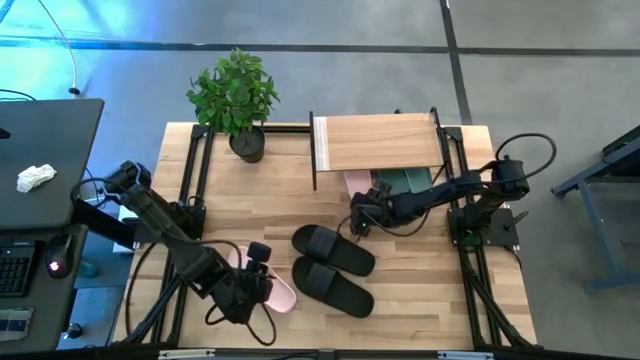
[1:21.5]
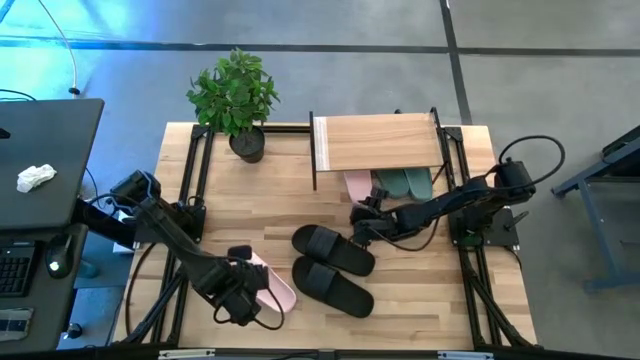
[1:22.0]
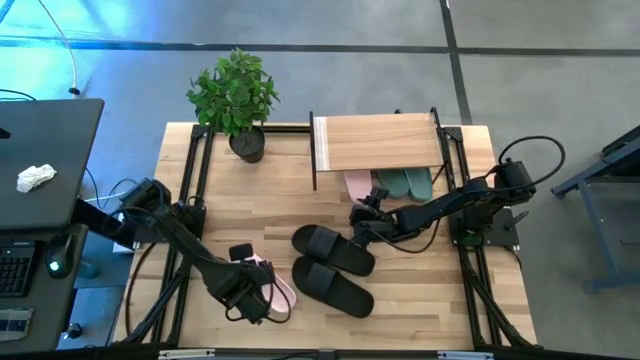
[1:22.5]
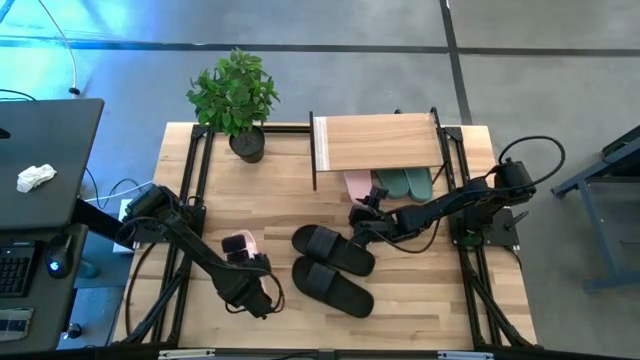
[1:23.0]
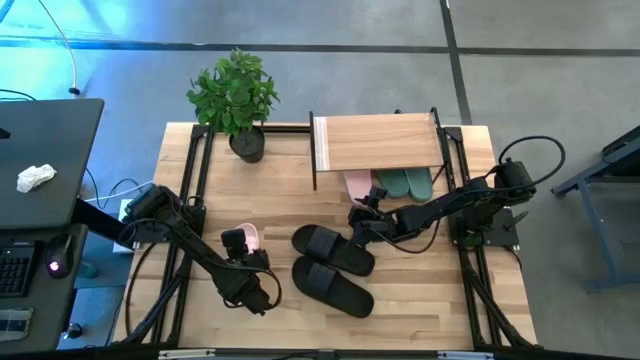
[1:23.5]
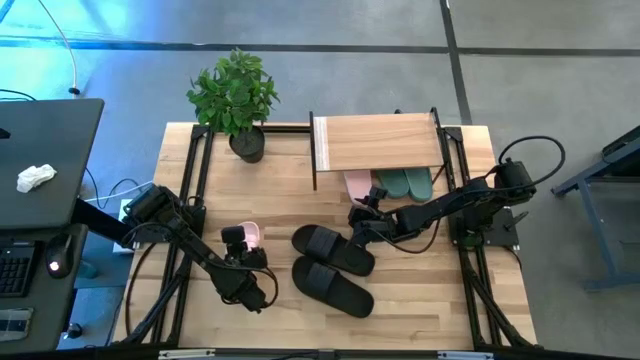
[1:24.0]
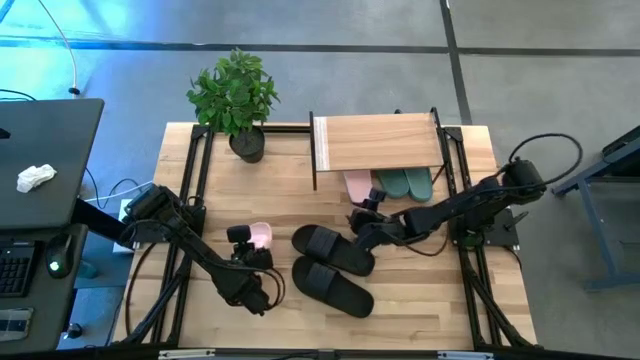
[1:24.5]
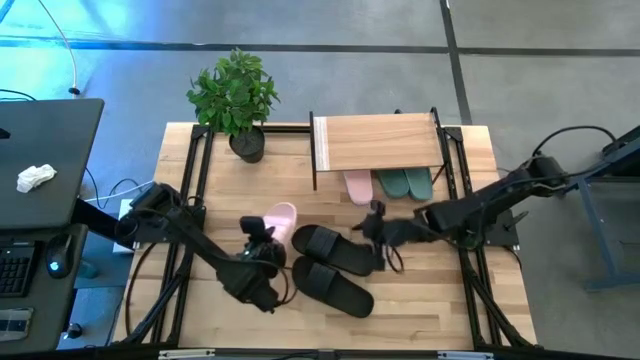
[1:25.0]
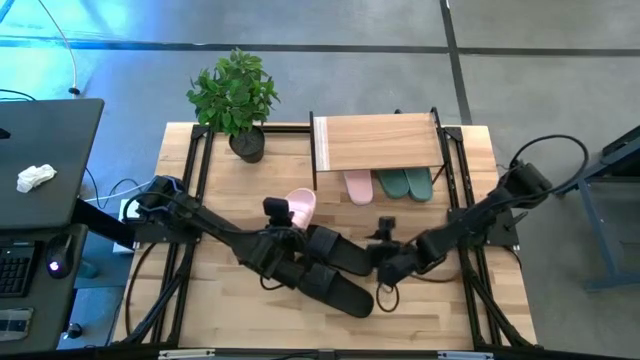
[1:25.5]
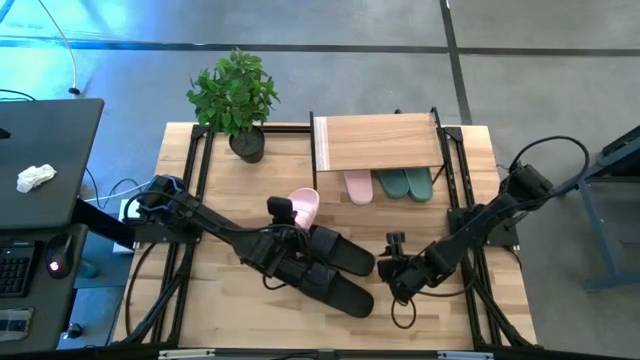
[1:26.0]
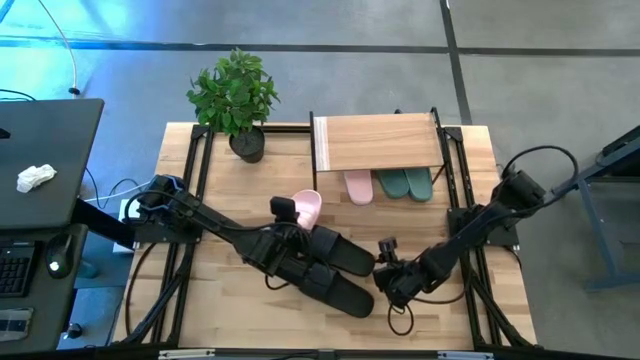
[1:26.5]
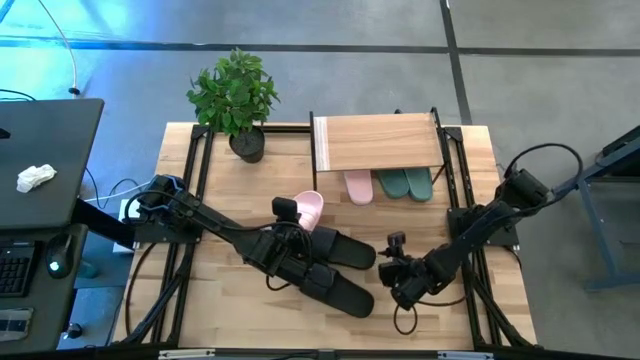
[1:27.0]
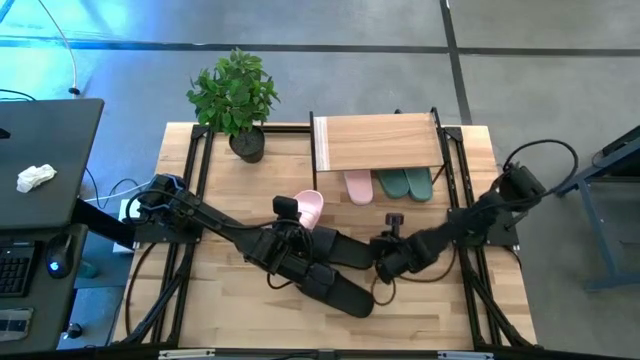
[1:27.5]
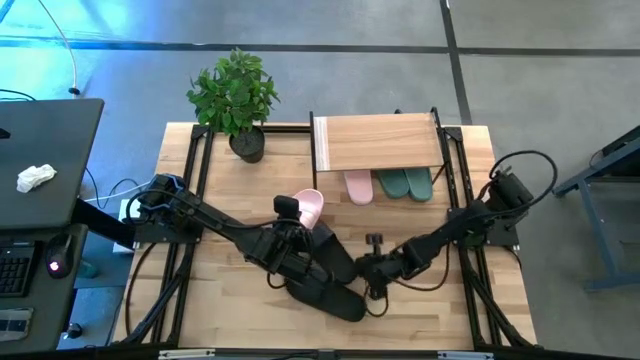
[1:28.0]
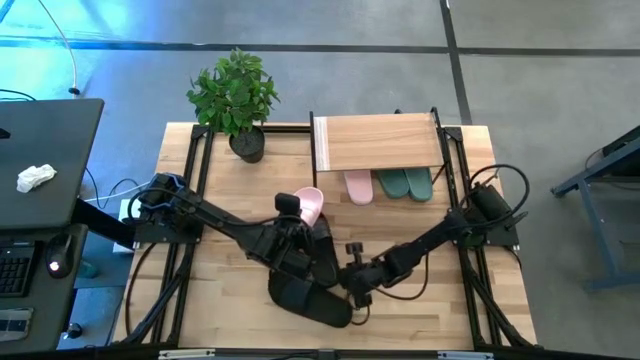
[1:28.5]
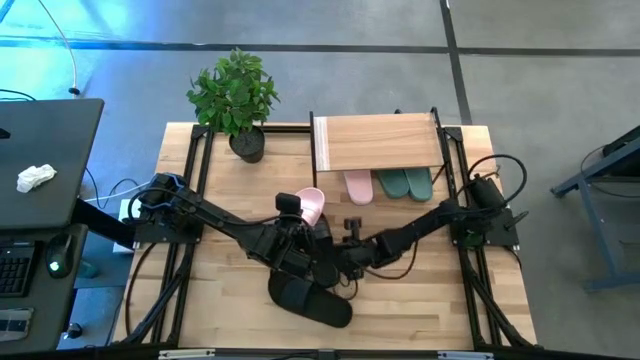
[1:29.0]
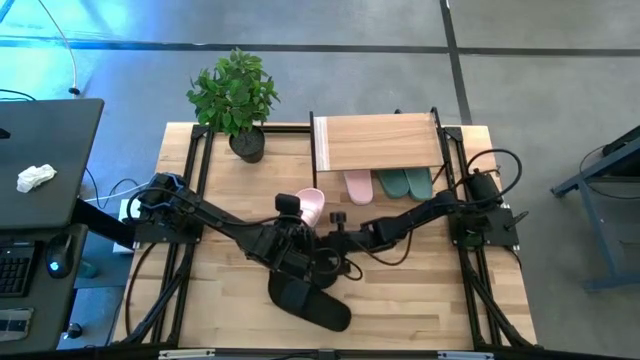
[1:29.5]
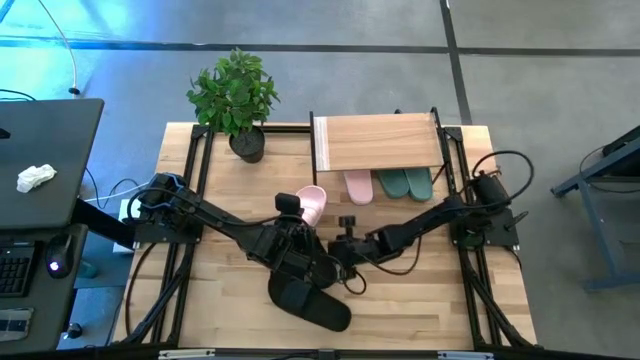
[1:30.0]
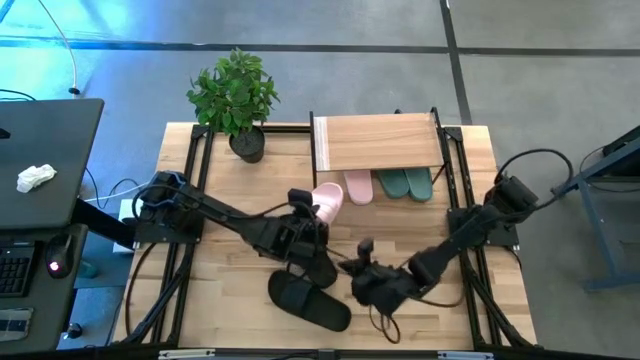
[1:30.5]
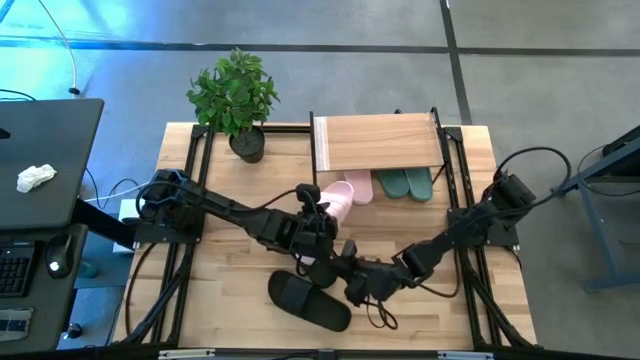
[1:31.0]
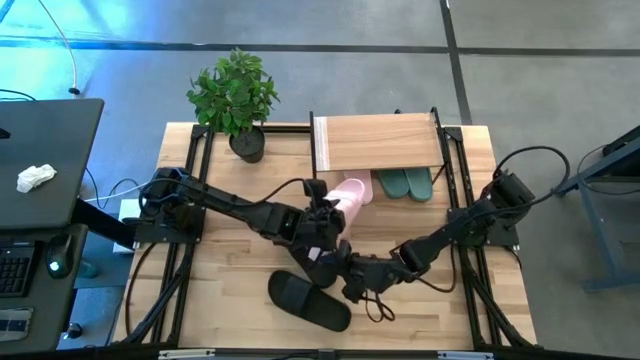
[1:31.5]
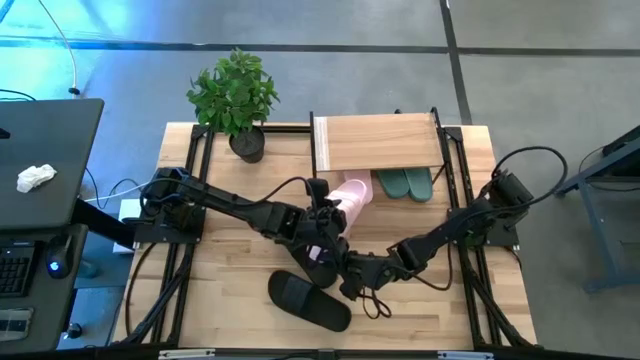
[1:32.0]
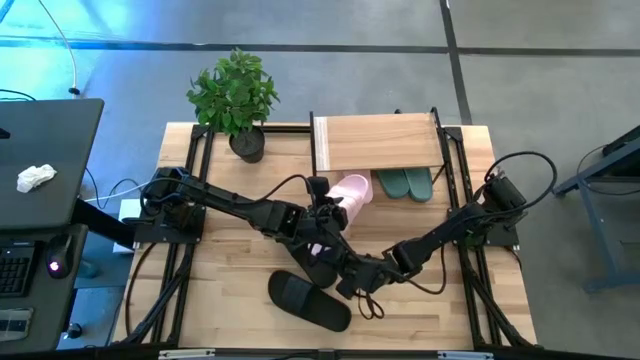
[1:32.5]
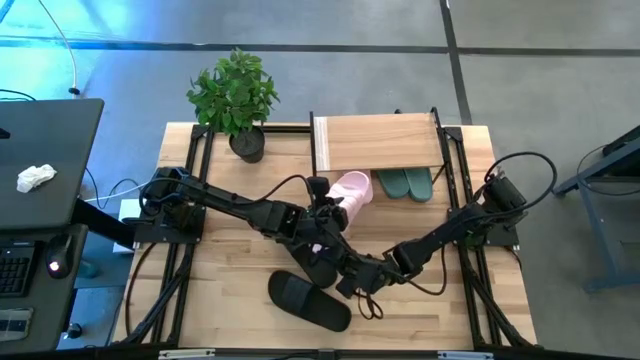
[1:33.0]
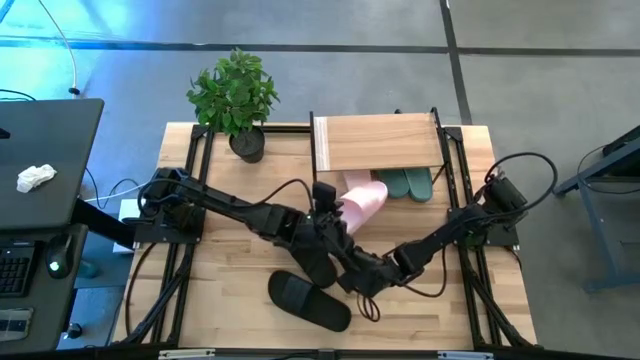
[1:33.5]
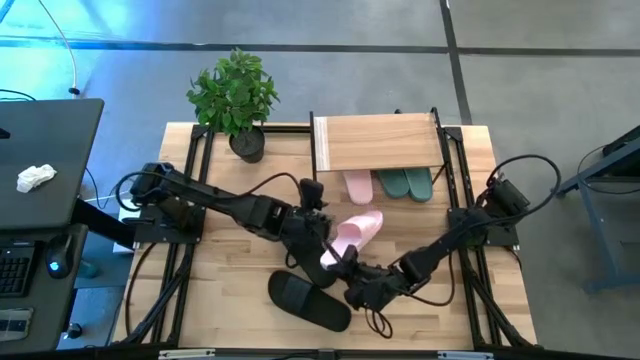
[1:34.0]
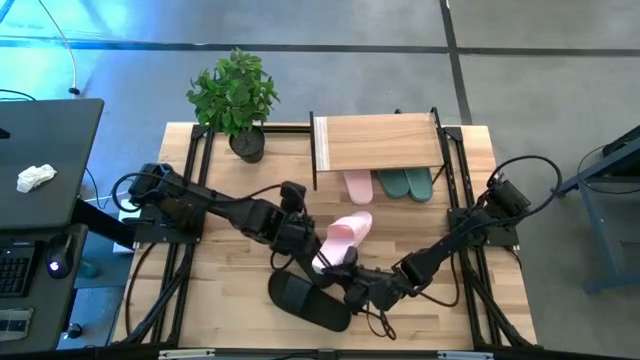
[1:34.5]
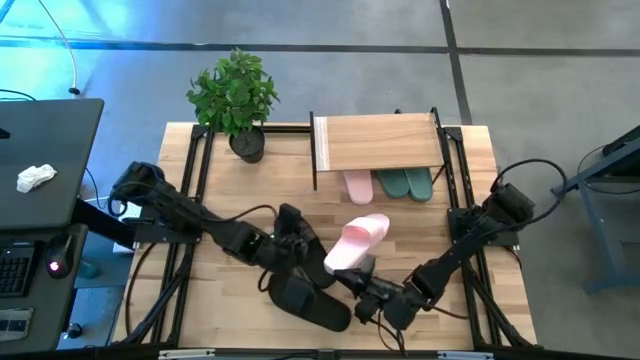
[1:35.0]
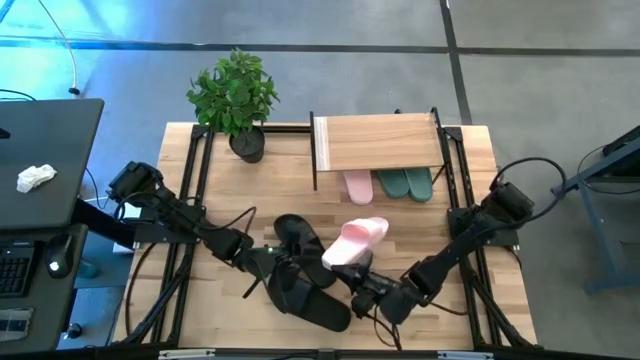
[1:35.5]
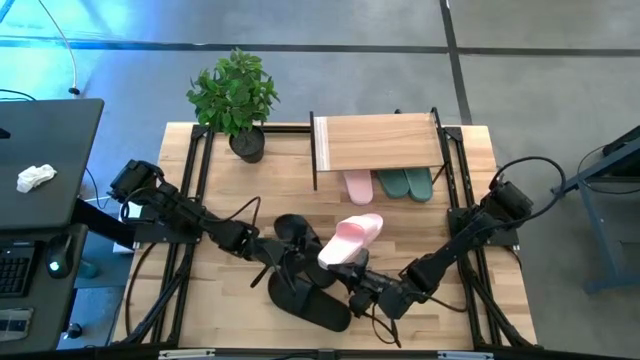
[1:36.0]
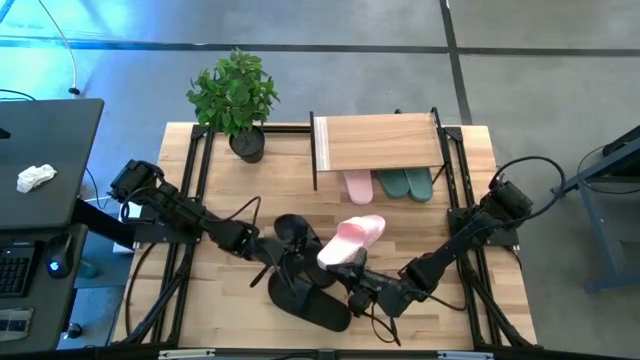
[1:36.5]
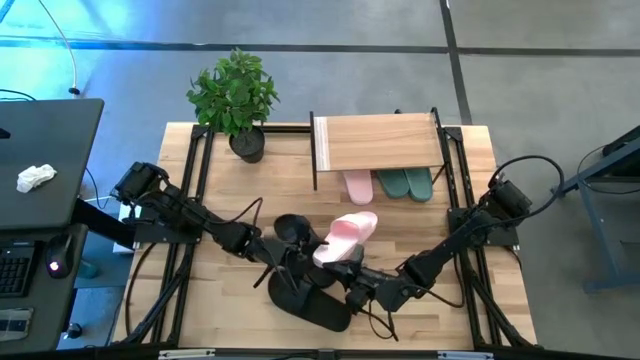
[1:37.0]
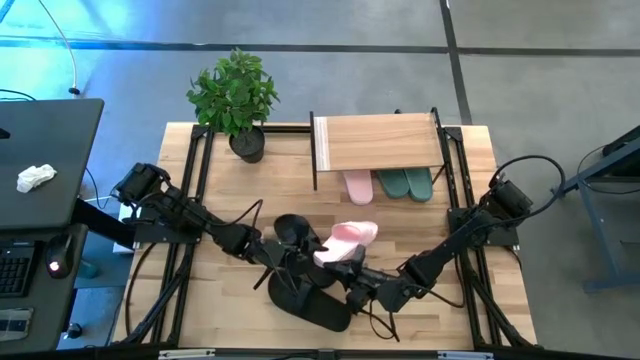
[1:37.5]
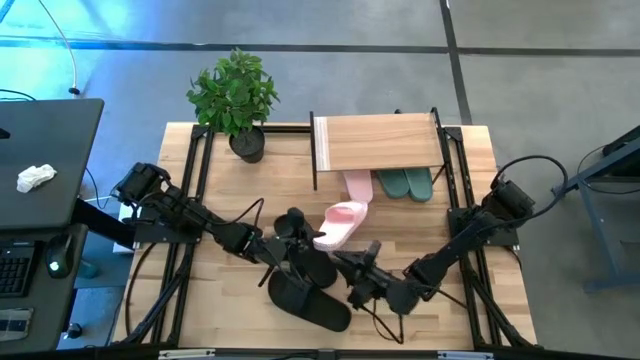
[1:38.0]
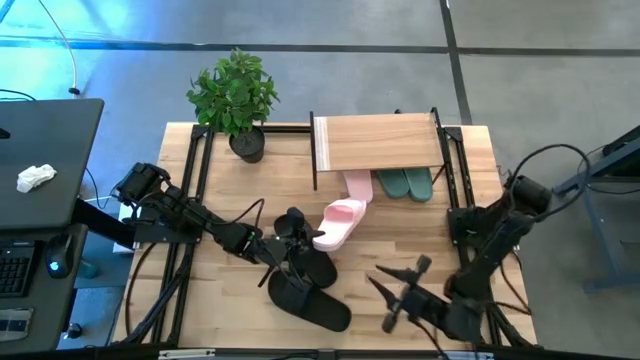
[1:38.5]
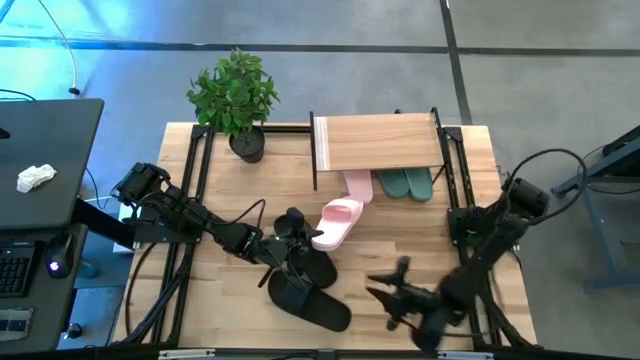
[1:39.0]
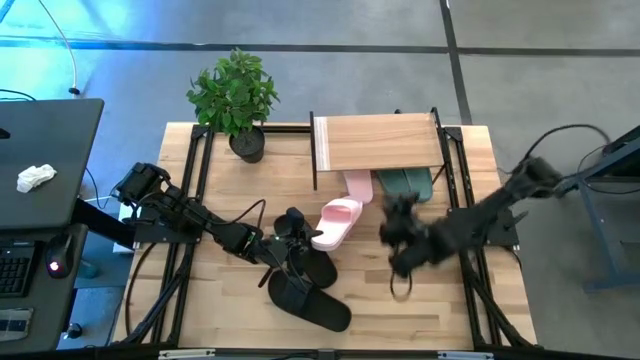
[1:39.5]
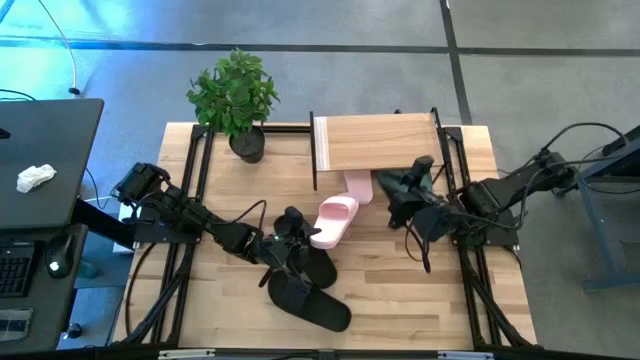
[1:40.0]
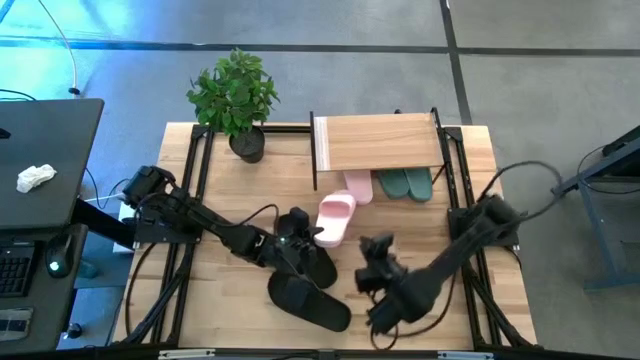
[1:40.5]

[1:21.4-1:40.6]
Task: Pick and place slides into the shelf
Put the pink slide under the shelf

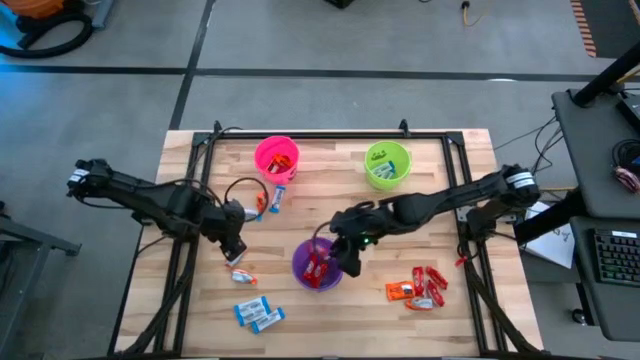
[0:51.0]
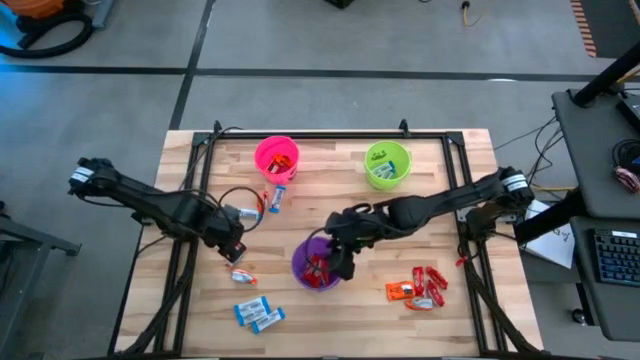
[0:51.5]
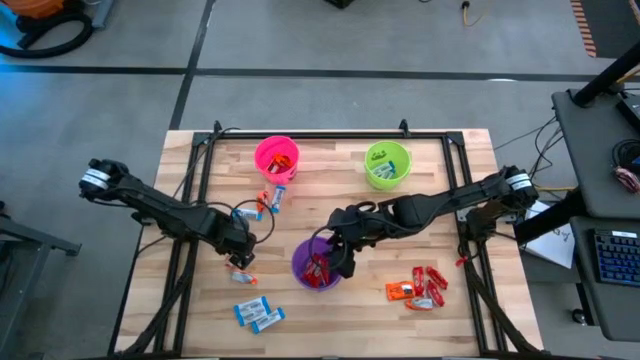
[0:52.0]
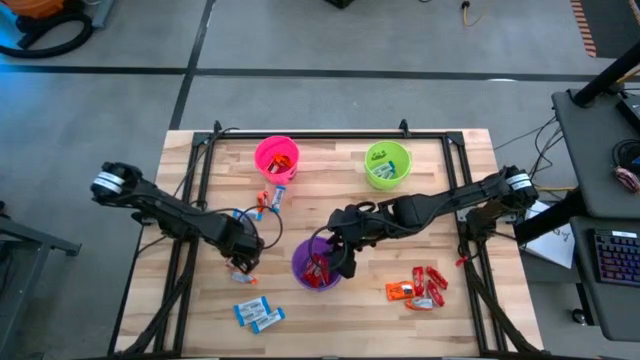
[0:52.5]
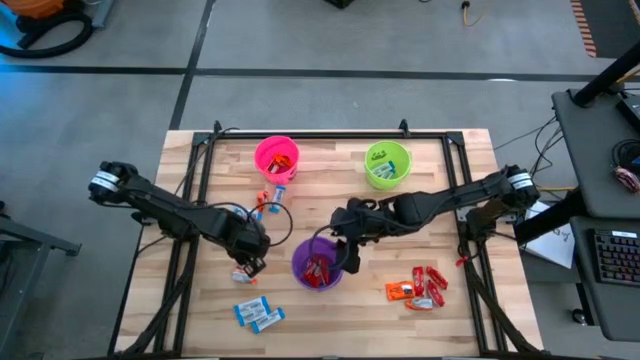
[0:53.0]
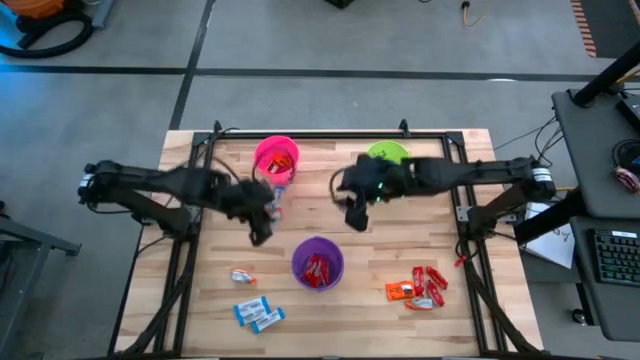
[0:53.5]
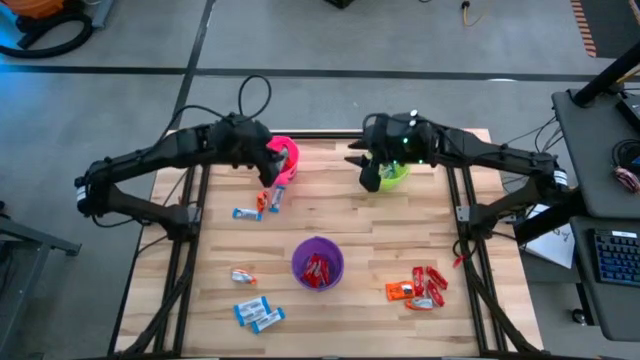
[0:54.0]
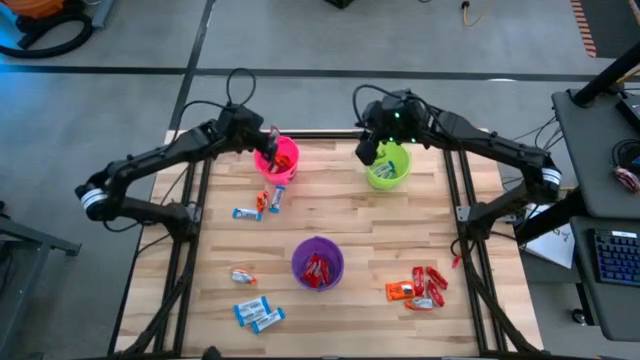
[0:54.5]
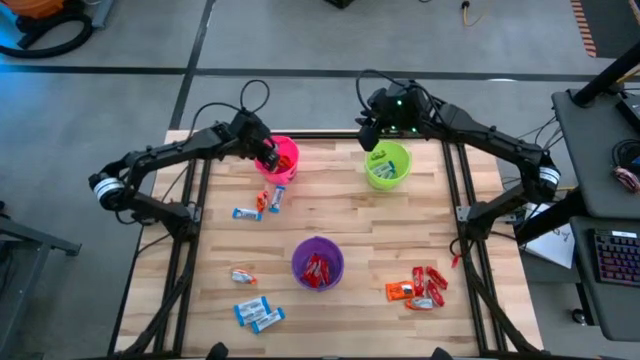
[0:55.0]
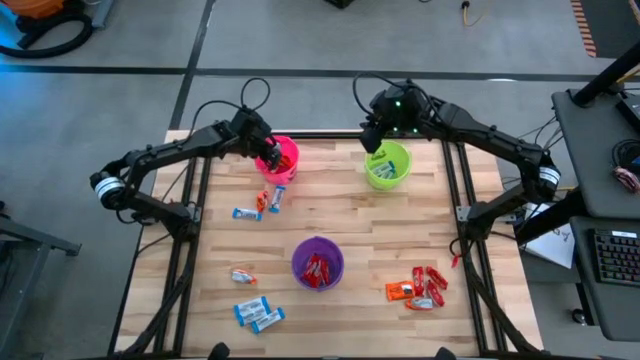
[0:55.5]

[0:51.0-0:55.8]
Task: Sort candy
Put the orange chocolate into the pink bucket
